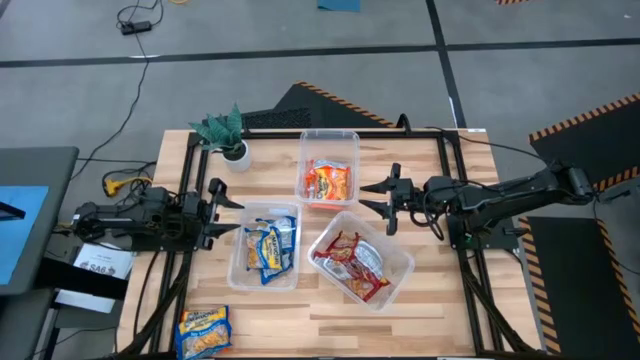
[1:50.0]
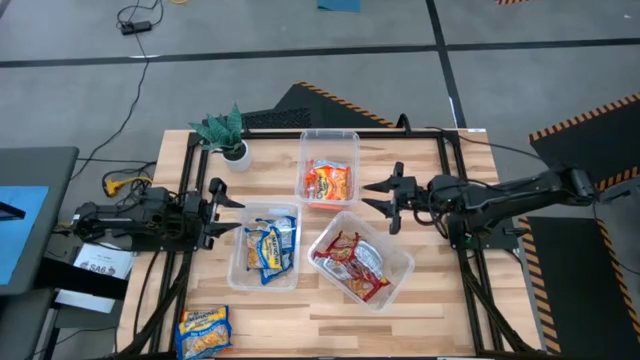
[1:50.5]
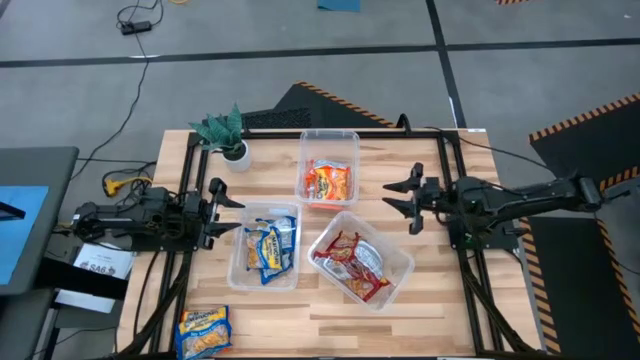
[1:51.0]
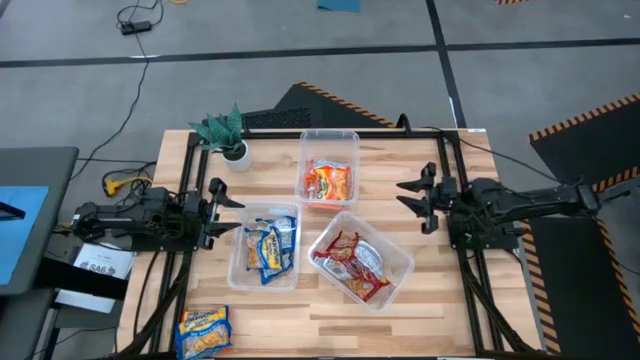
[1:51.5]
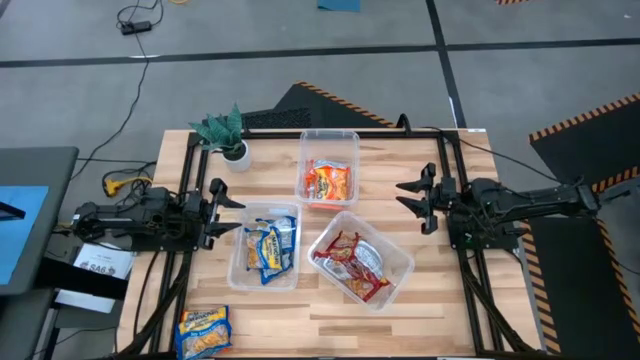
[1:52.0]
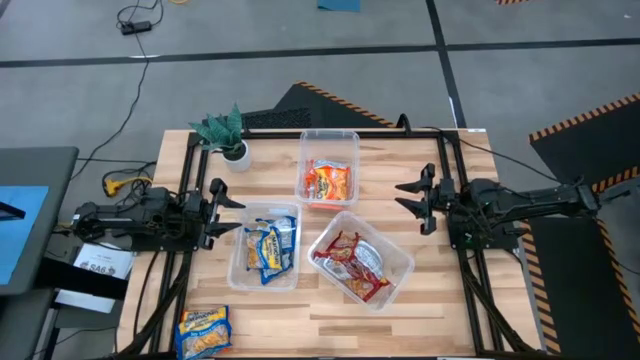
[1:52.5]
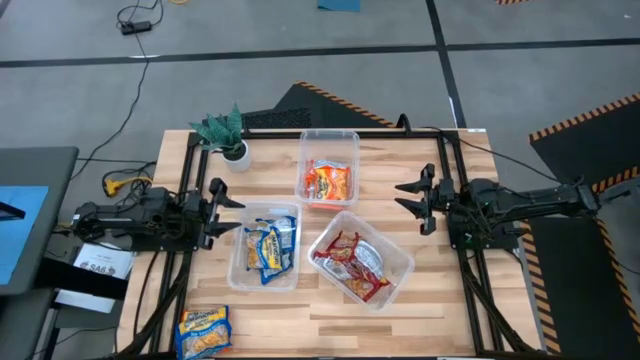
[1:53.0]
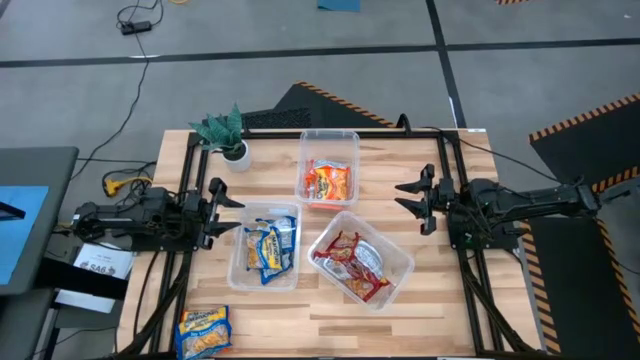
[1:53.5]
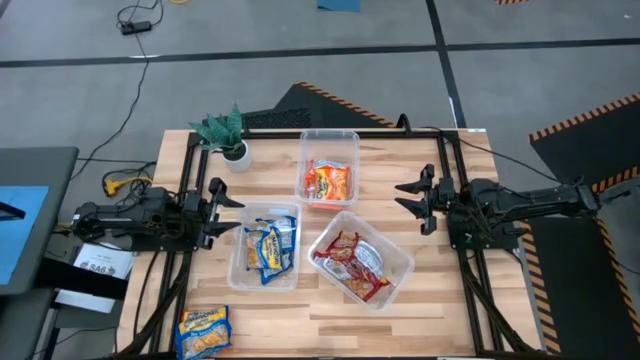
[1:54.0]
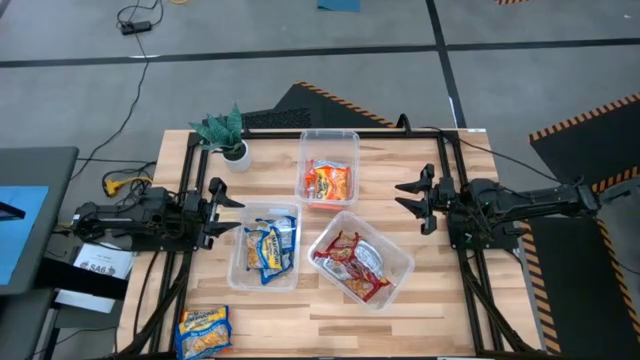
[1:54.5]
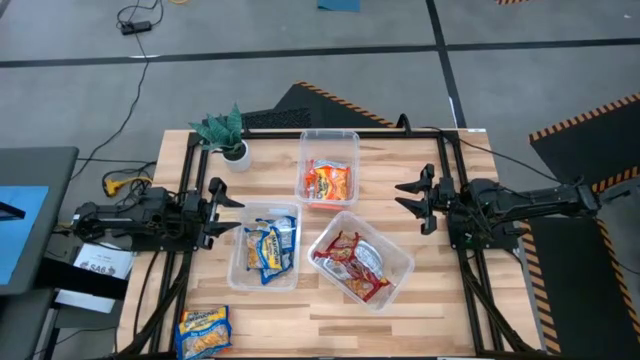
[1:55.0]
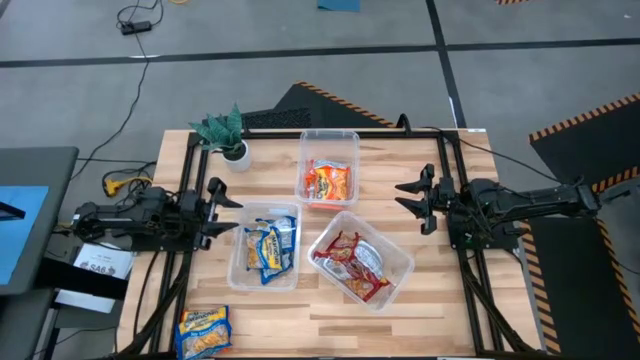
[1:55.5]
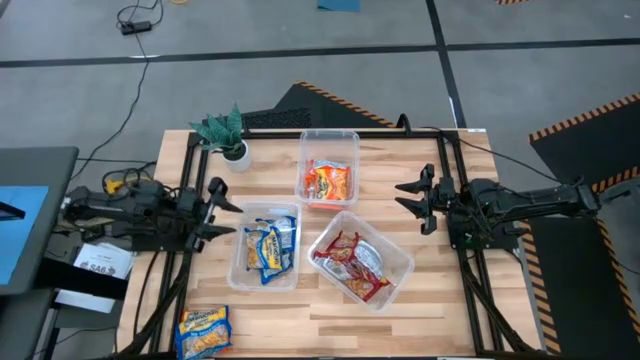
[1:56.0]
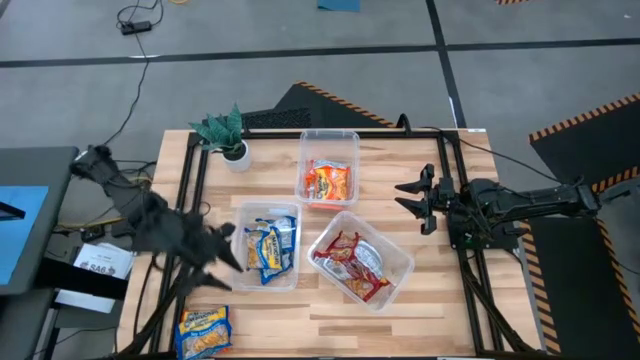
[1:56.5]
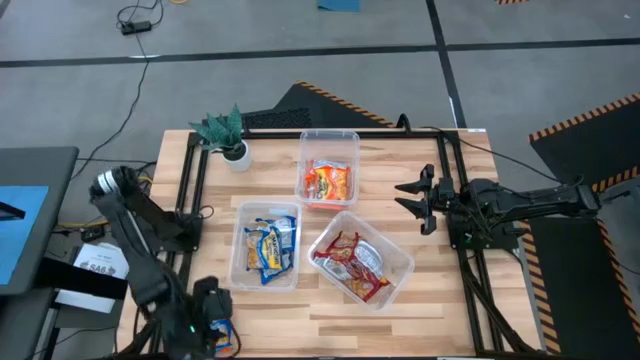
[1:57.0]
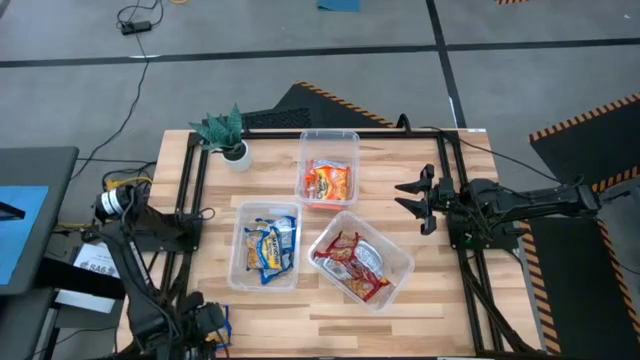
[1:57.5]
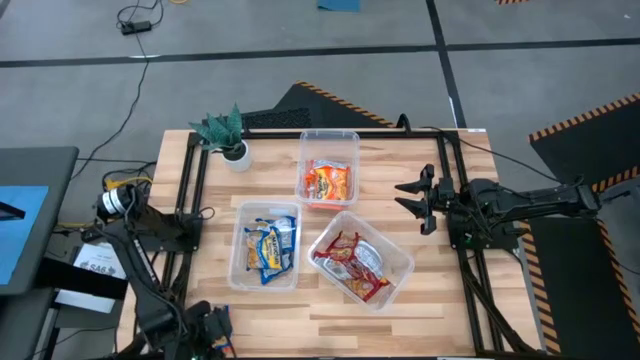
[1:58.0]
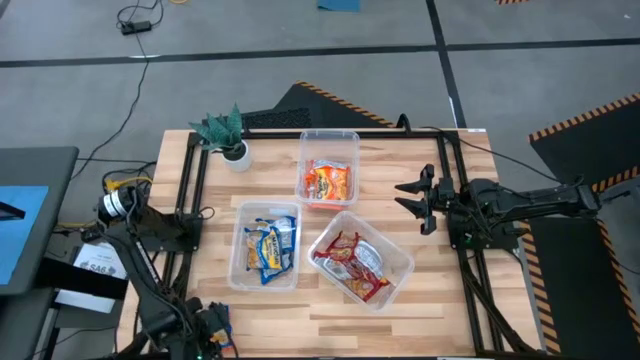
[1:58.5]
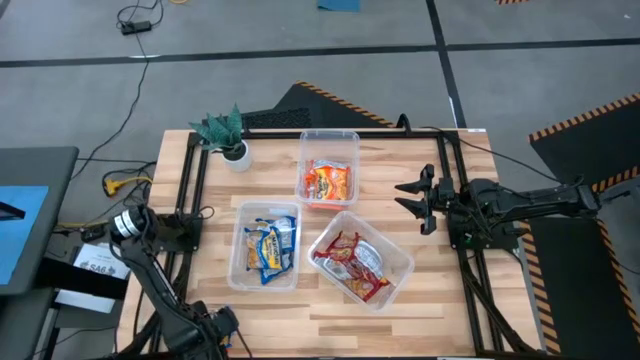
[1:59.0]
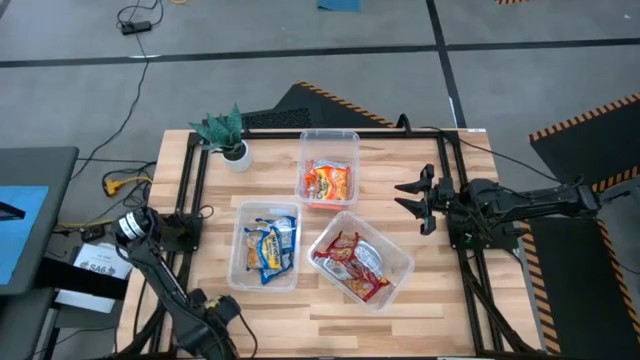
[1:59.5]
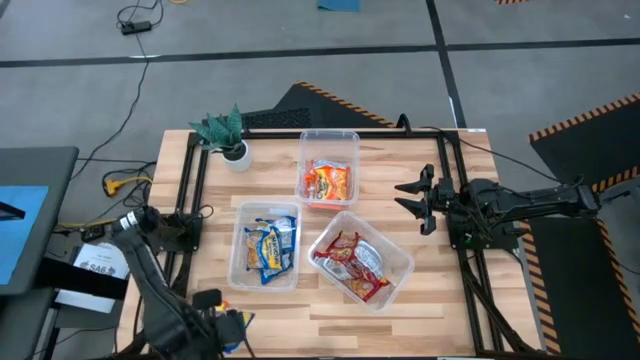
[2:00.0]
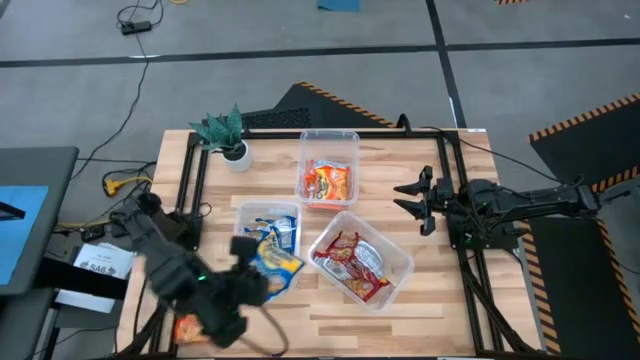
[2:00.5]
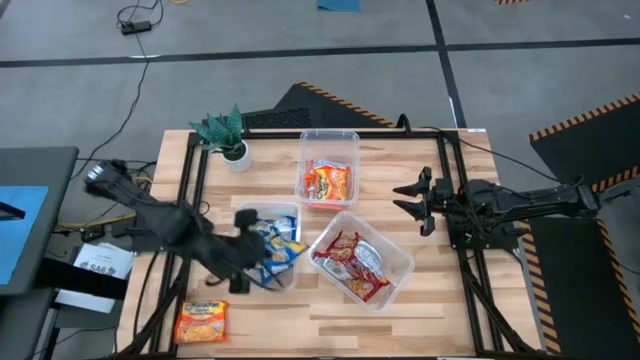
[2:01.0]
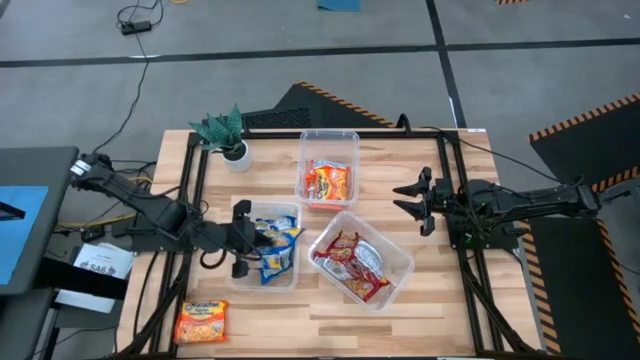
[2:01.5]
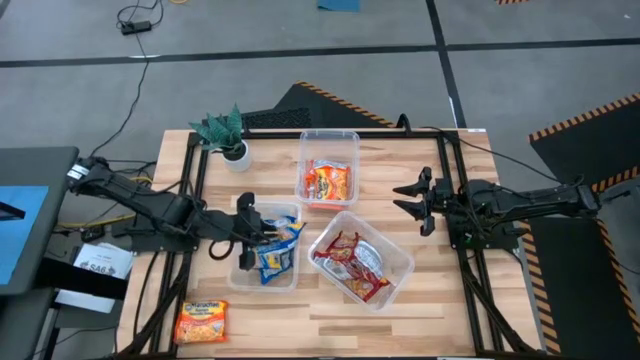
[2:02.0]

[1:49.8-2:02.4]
Task: Sort Maruchan noodles
Put the blue noodle pack into the bottom left transparent bin

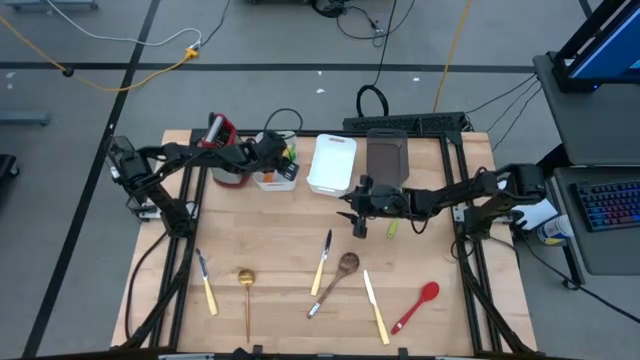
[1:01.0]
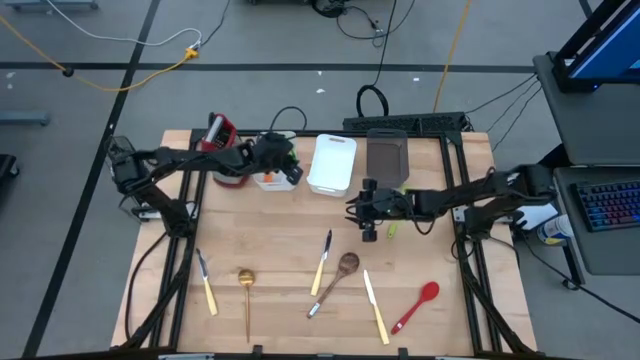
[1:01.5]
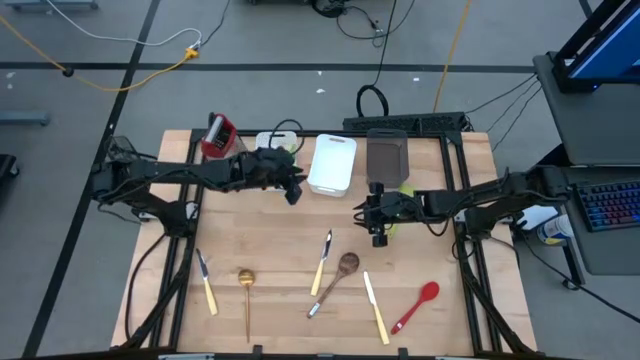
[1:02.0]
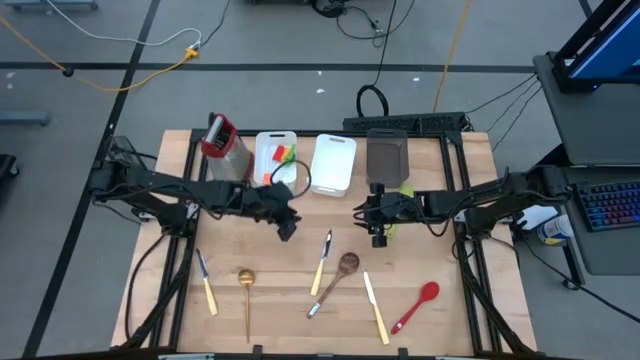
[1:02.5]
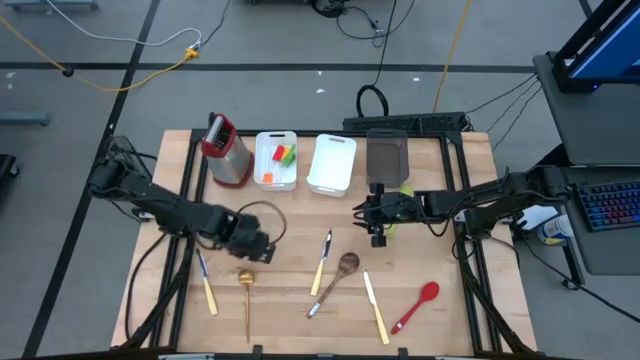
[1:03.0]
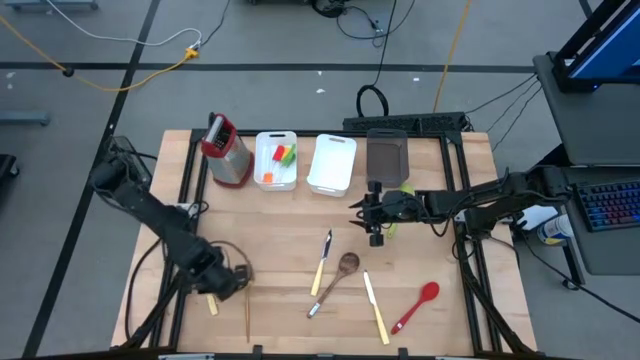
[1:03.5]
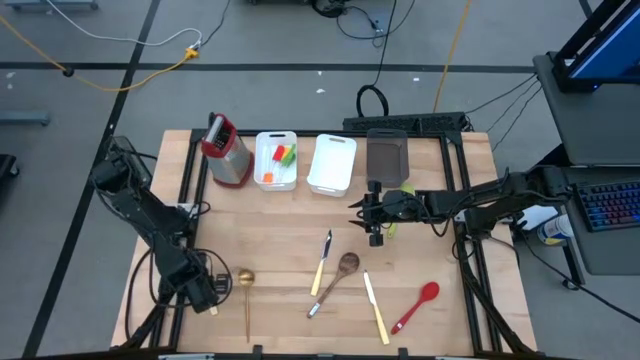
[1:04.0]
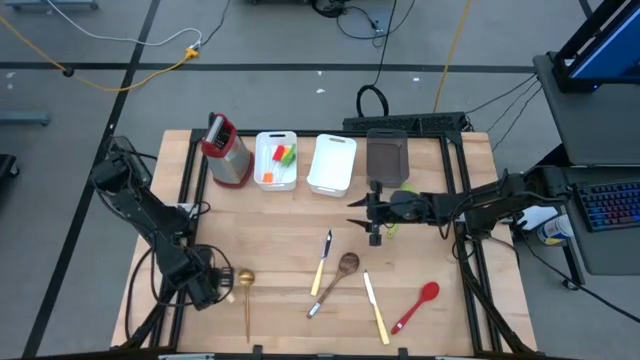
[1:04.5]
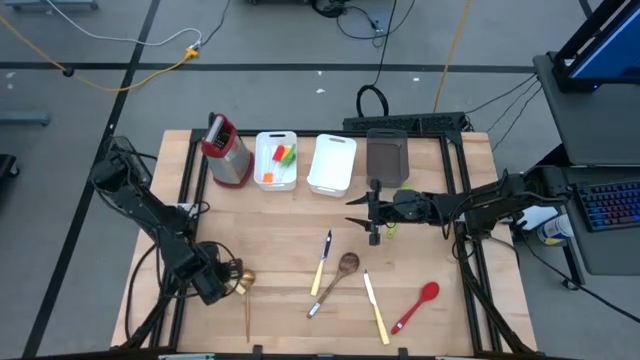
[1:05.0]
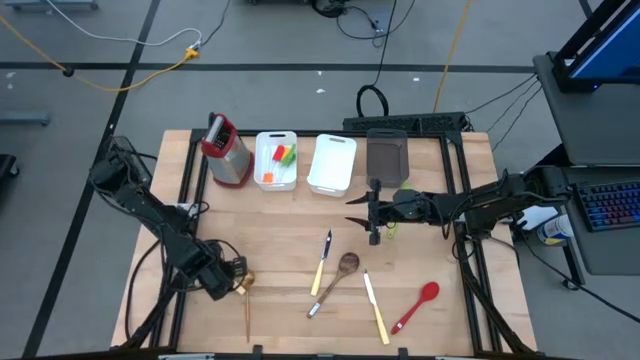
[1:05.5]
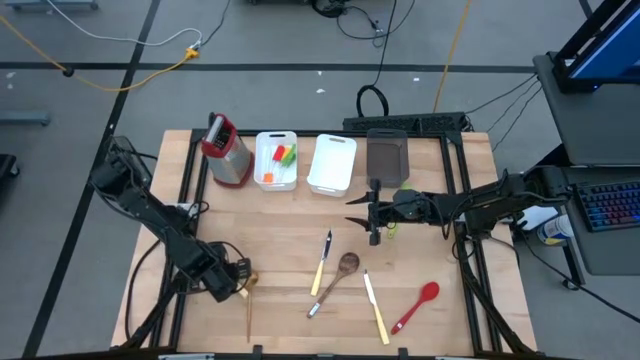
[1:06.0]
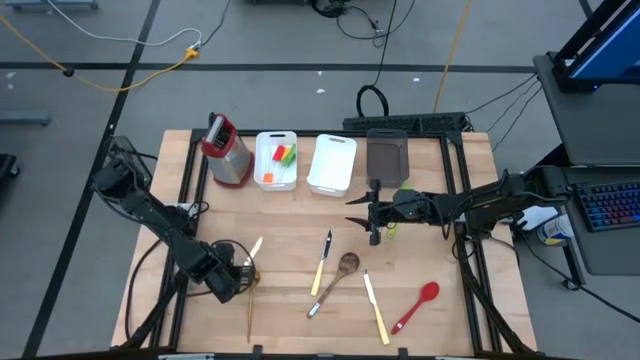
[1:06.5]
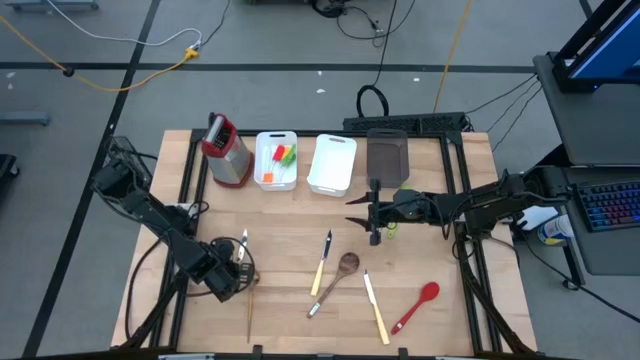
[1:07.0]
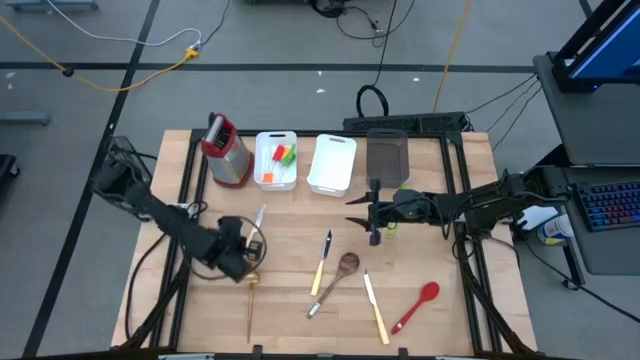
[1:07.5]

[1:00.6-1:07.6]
Task: Pick & Place Kitchen Items
Put the bottom left yellow knife into the right white bin
